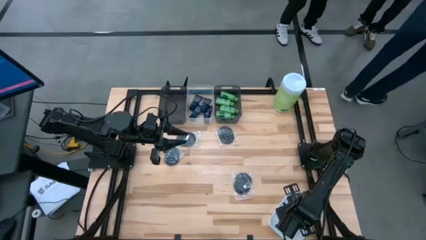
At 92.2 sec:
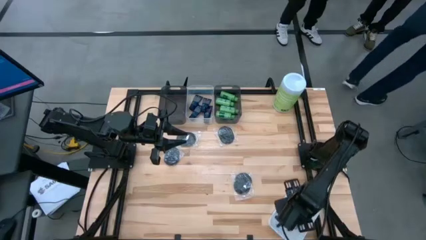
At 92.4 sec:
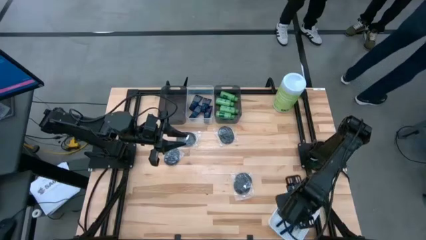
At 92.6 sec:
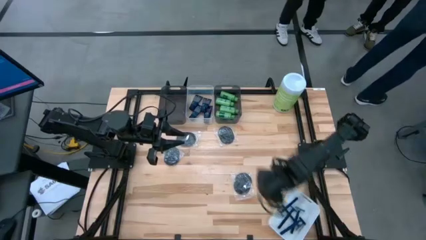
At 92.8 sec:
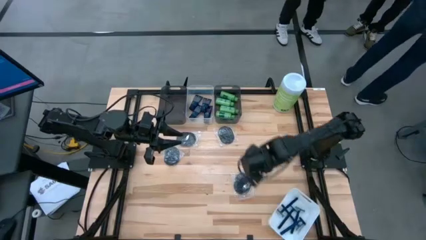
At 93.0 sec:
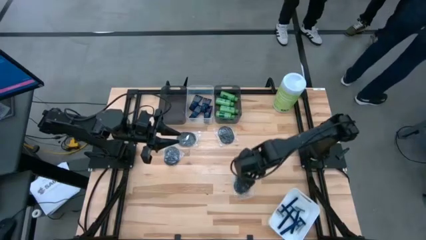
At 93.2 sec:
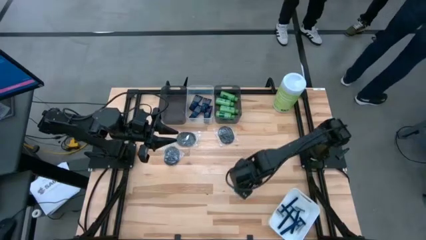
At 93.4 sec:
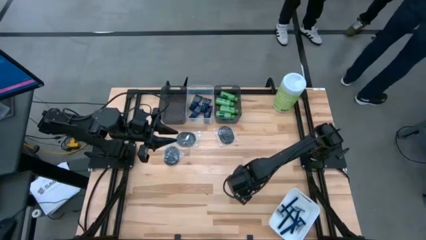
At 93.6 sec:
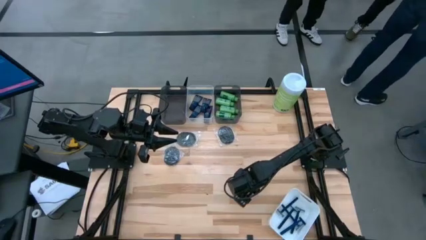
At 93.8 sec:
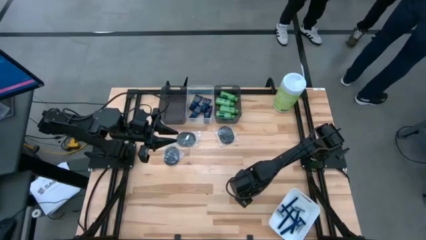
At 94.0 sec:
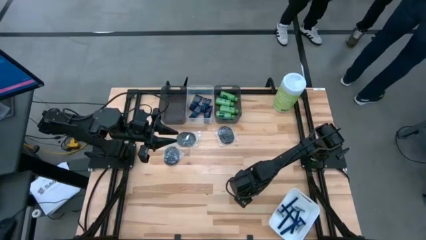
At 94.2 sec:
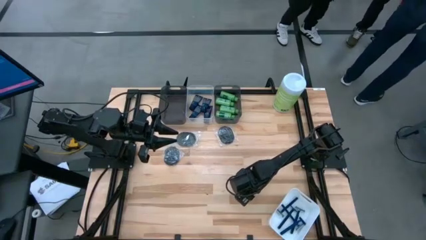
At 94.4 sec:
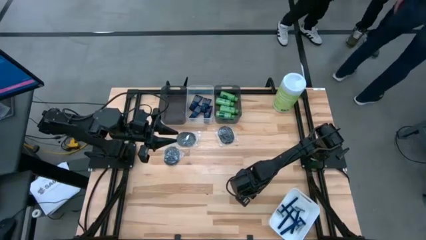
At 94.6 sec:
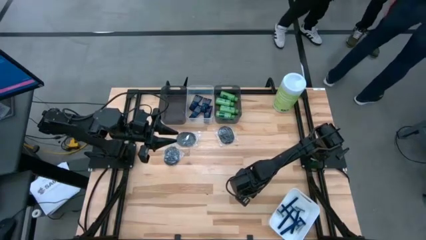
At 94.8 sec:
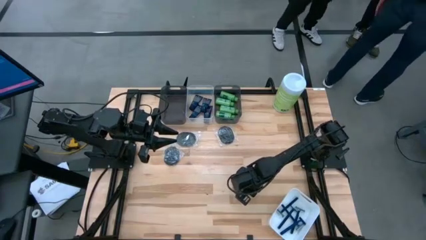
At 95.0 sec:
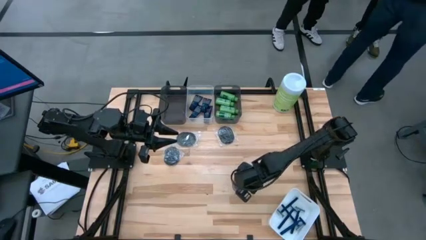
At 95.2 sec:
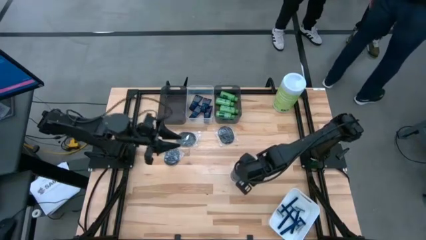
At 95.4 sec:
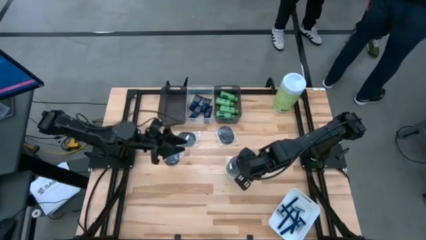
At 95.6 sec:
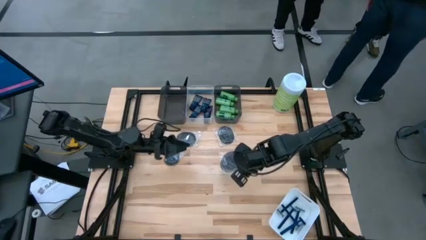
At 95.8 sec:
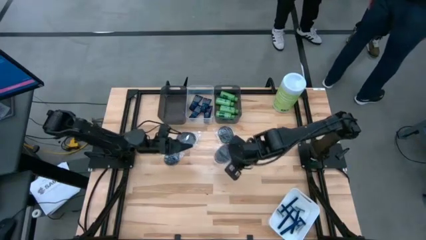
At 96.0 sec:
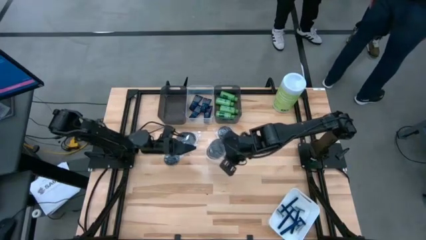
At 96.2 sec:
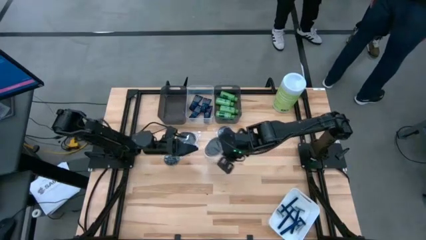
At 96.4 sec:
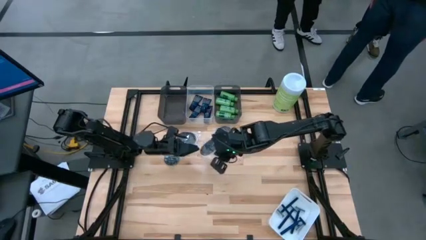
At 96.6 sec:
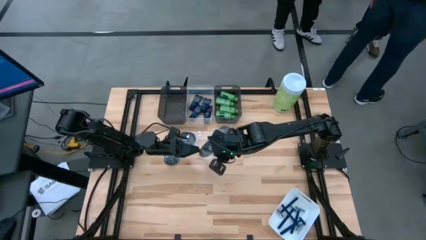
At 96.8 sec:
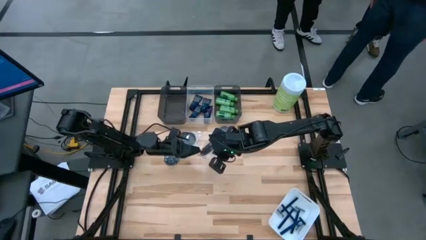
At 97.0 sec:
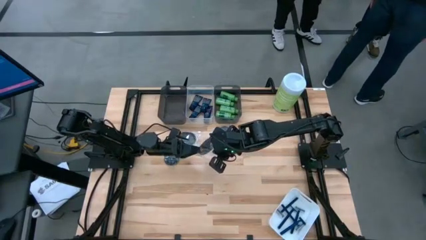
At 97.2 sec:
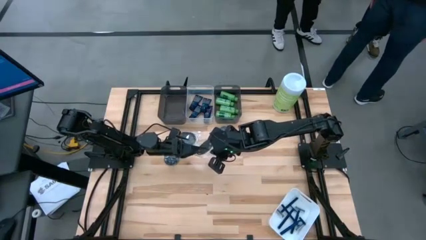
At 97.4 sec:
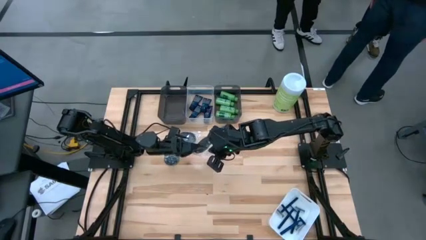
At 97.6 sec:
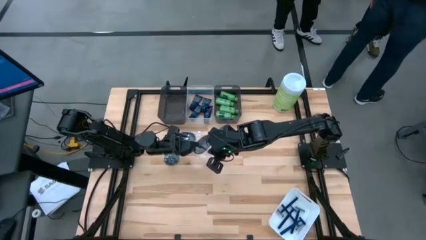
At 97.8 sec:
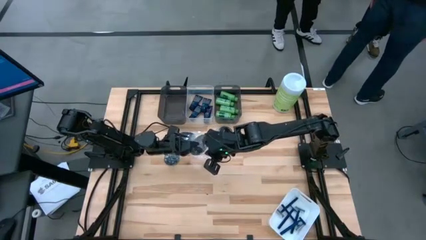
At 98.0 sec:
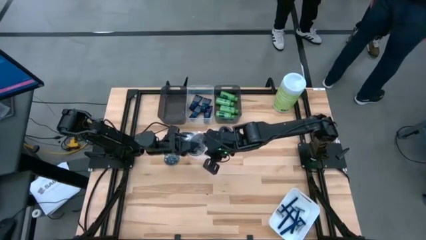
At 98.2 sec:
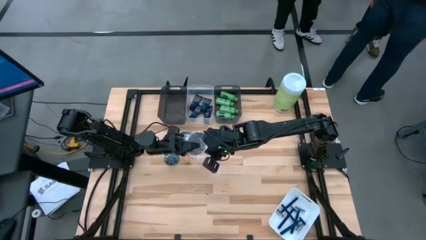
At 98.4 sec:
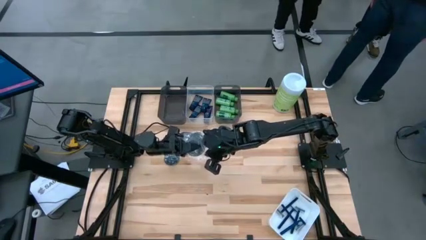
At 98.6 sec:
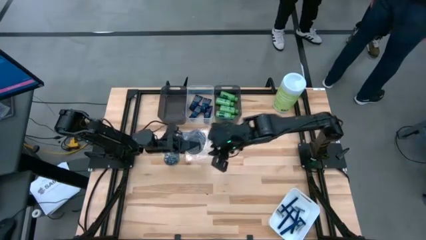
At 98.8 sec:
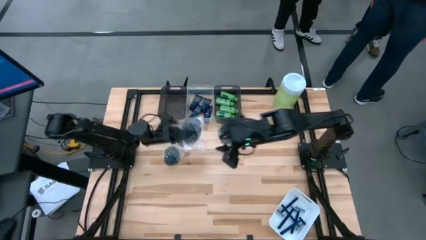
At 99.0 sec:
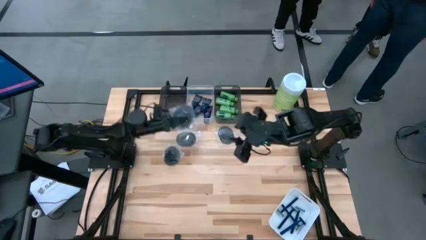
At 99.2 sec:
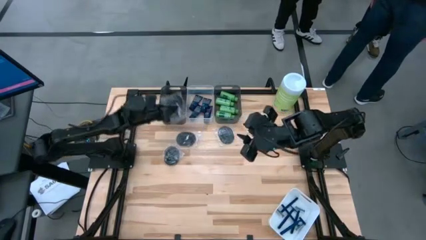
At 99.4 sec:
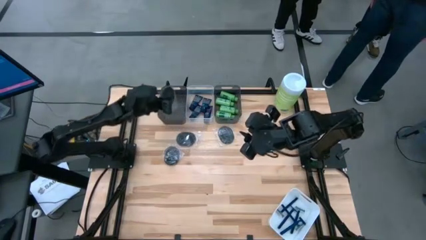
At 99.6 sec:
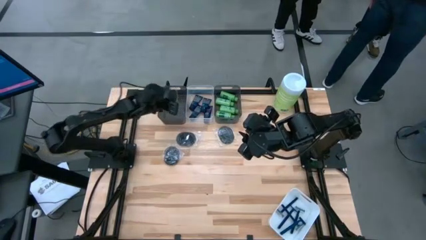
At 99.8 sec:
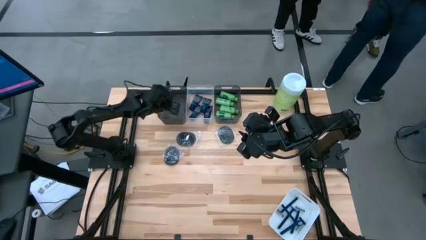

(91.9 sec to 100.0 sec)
Task: Pick & Place Travel size toiletries
Put the black hairbrush into the left black bin

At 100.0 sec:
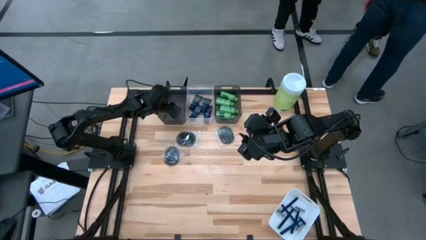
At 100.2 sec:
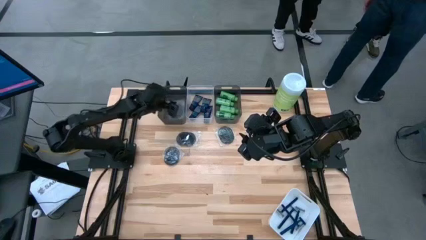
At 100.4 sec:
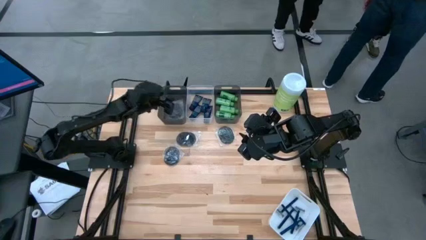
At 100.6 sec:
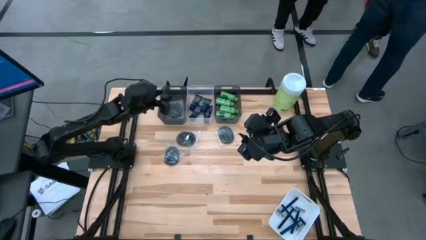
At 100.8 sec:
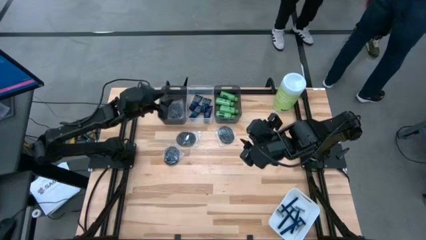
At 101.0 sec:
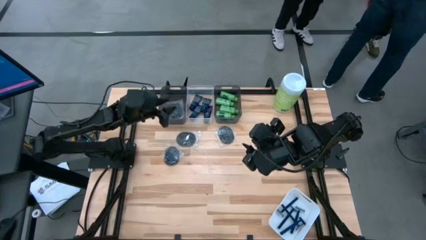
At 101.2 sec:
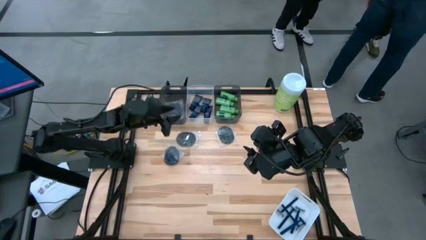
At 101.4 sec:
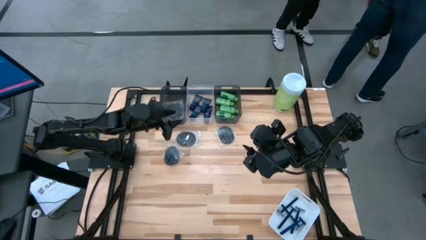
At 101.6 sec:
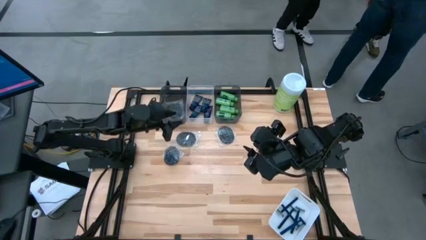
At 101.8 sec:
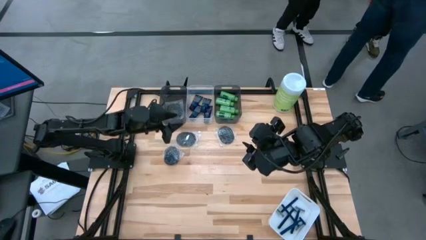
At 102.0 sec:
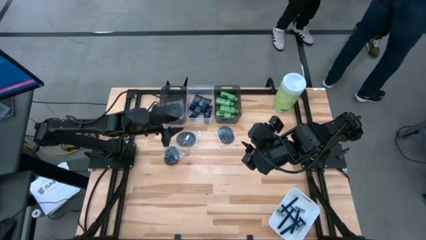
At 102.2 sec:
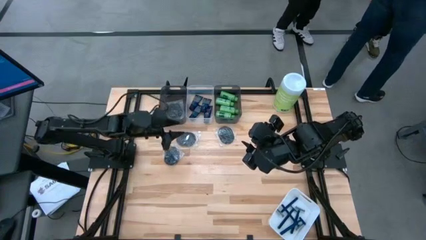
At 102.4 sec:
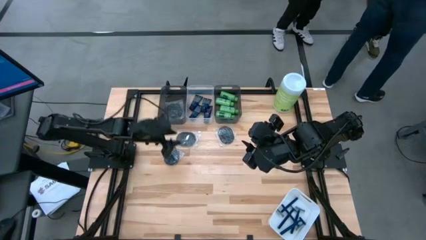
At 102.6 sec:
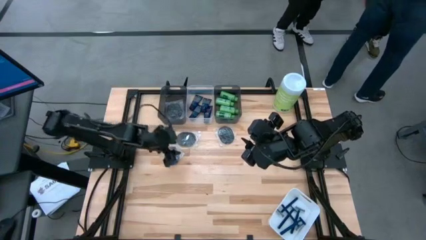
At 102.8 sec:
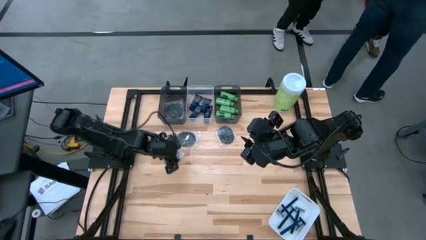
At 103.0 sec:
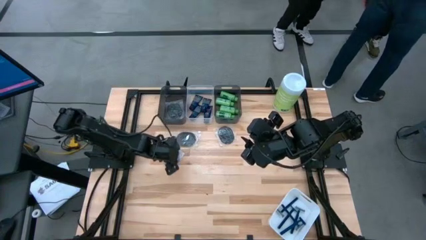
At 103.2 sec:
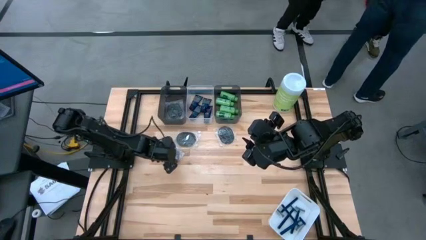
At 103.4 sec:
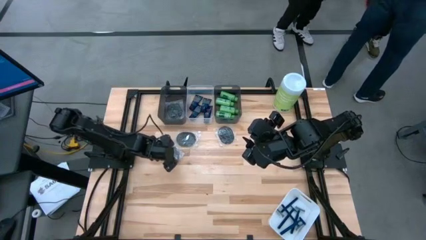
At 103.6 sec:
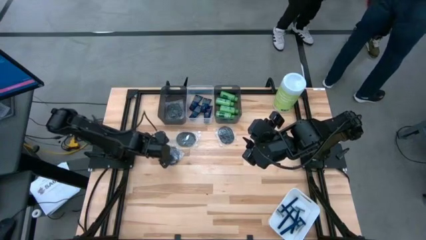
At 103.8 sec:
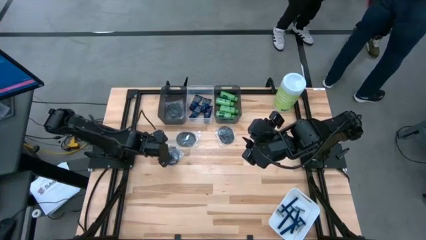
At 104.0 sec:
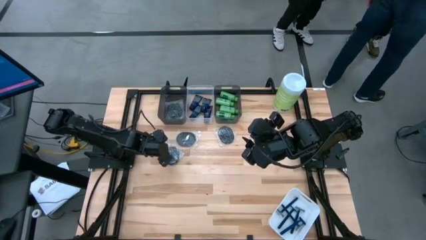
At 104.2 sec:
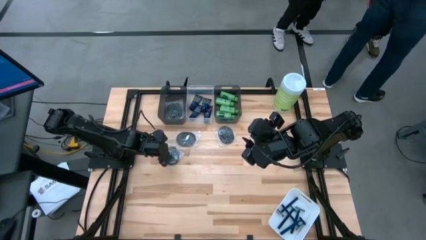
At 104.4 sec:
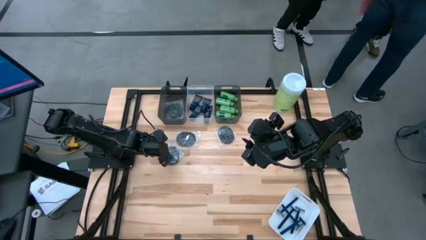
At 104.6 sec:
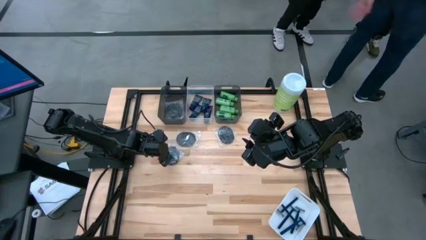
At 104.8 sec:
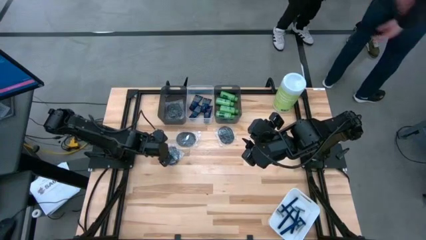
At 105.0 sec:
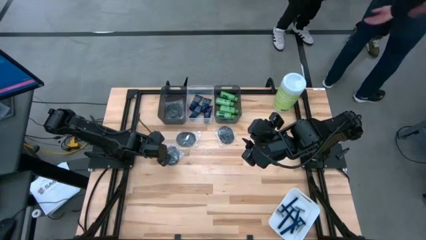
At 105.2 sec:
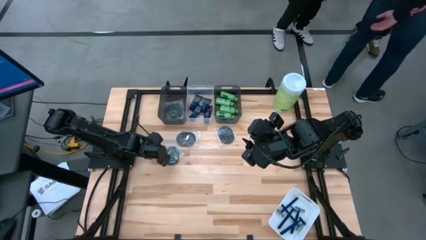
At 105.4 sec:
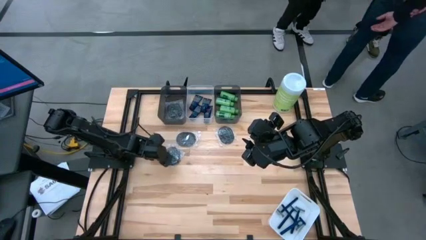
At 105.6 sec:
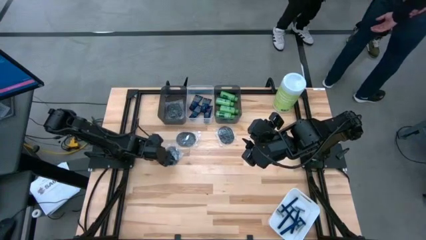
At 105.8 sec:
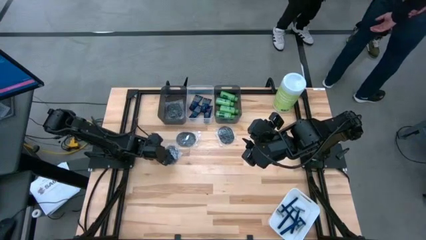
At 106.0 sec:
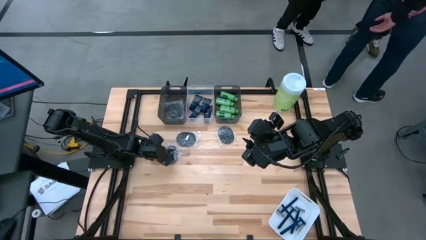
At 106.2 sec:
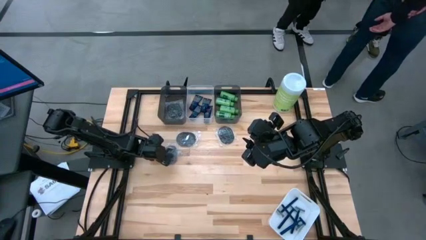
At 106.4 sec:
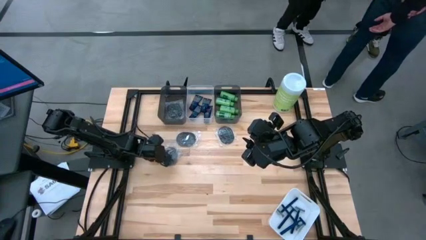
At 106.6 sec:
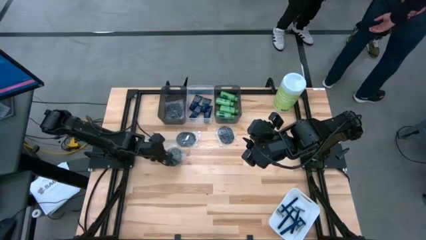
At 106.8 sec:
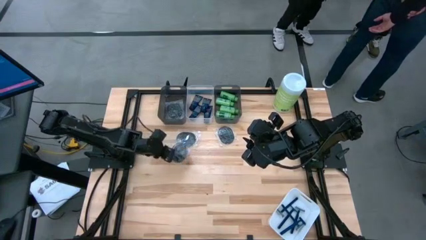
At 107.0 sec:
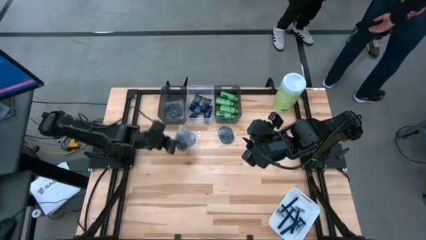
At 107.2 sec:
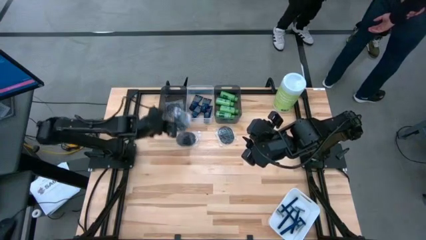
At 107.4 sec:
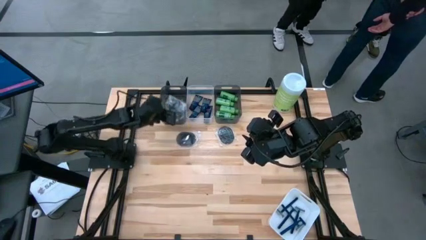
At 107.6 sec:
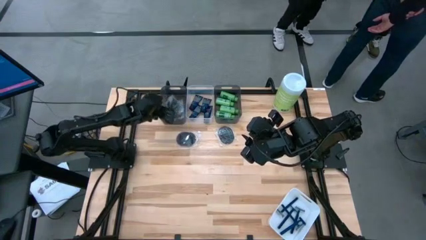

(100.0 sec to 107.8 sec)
Put the black hairbrush into the left black bin

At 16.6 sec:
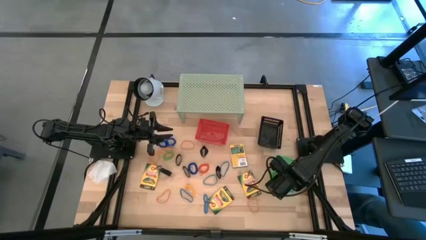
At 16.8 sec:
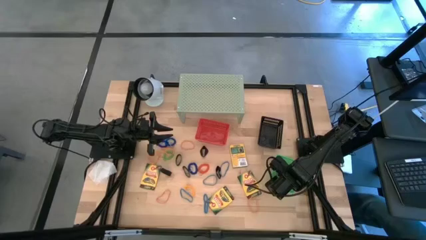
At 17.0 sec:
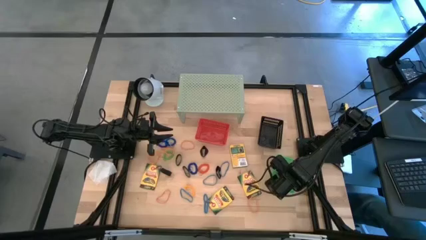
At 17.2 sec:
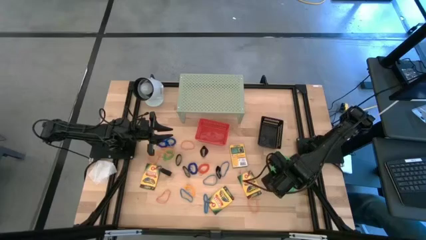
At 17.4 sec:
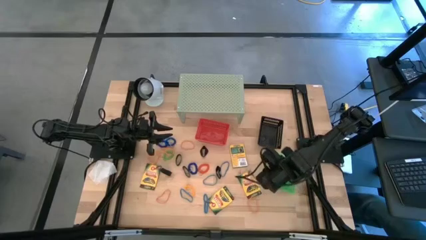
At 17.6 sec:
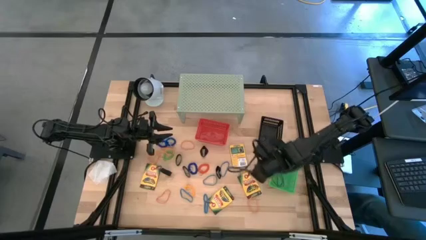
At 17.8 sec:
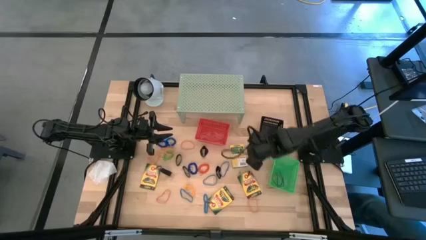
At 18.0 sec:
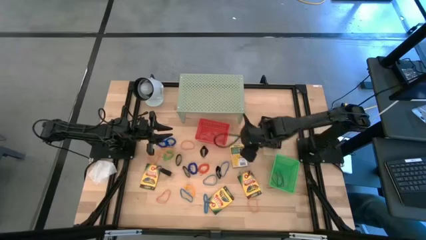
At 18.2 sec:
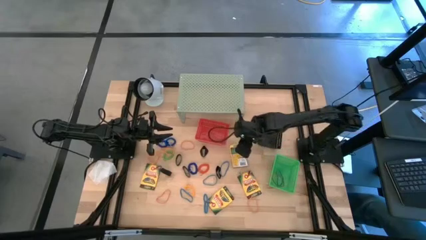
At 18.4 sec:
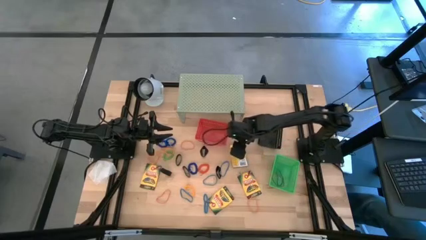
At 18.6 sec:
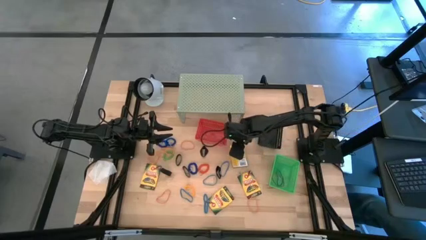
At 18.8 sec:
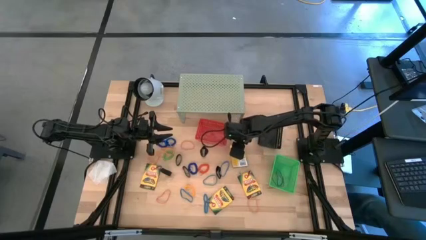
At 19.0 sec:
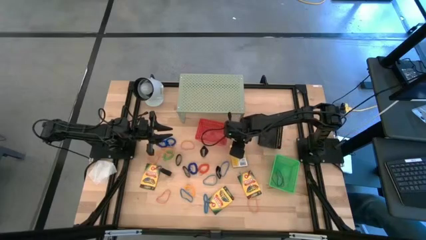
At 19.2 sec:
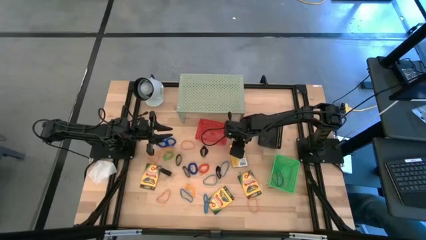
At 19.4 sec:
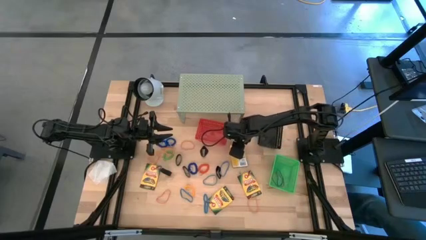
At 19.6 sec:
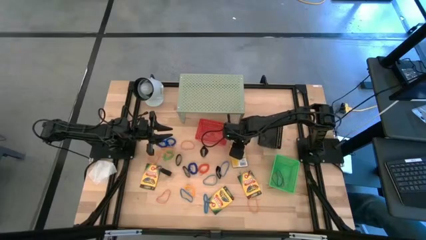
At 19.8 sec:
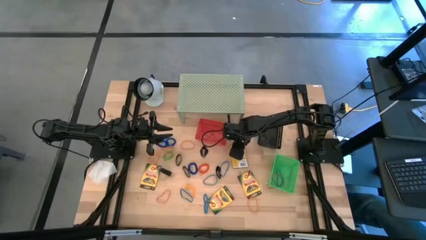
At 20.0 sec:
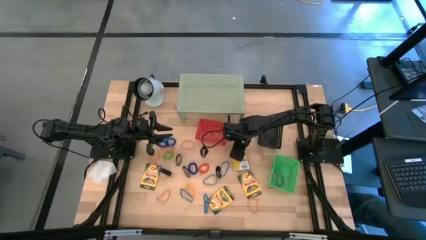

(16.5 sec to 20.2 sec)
Task: Pick & Place Office Desk Supplies
Put the crayon box into the black bin
